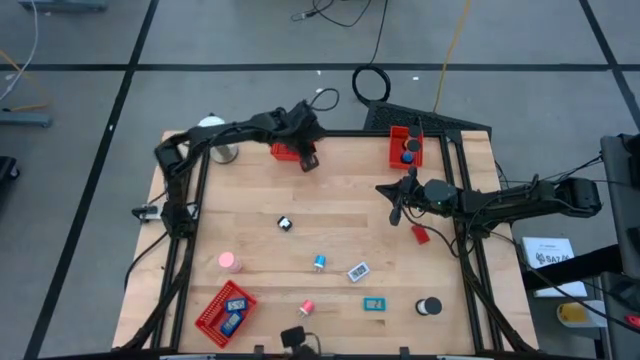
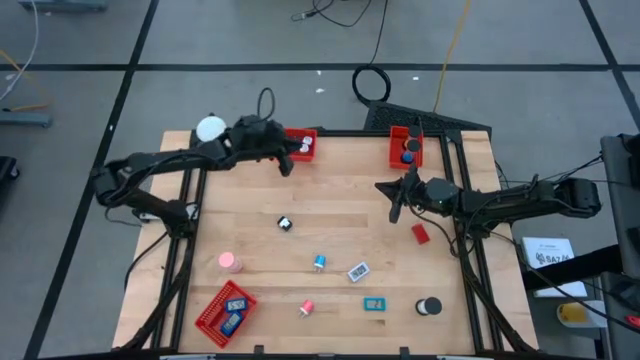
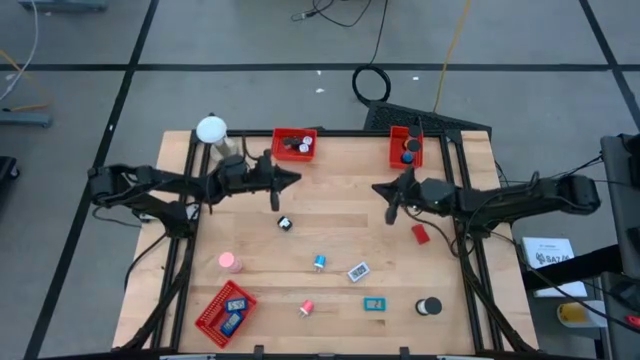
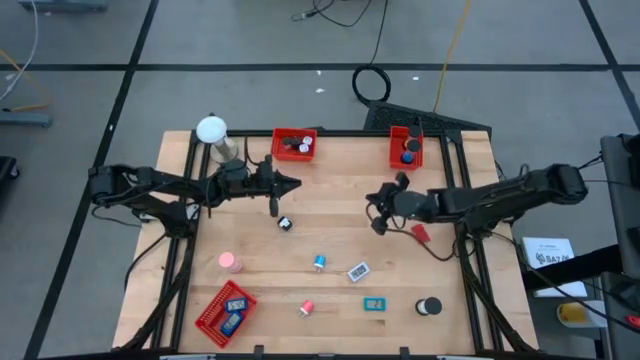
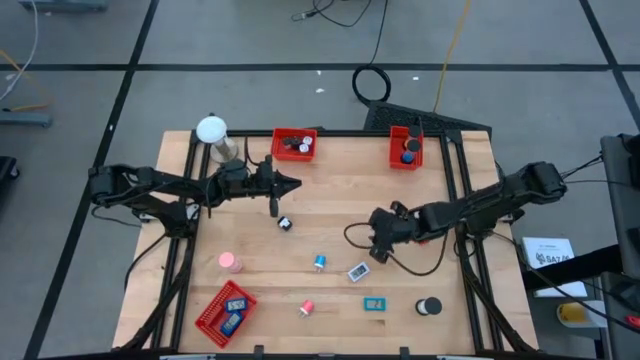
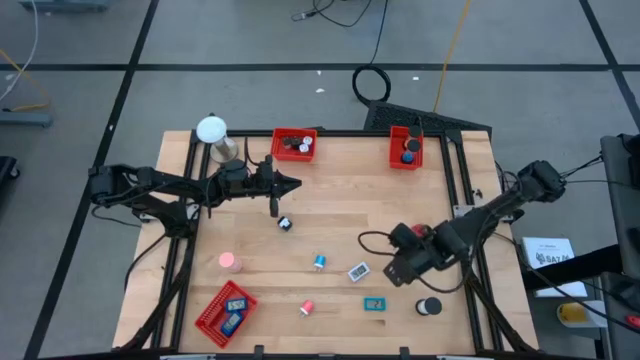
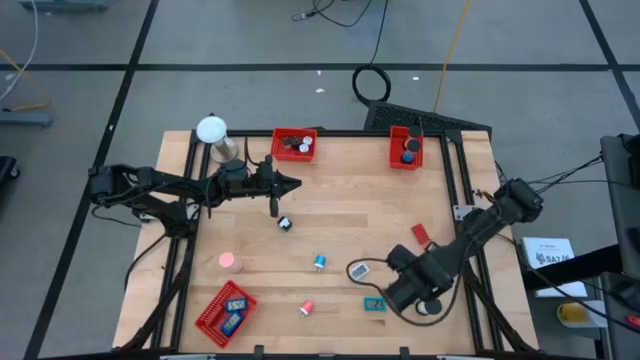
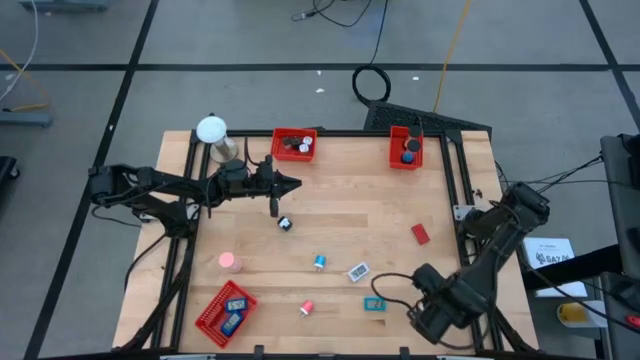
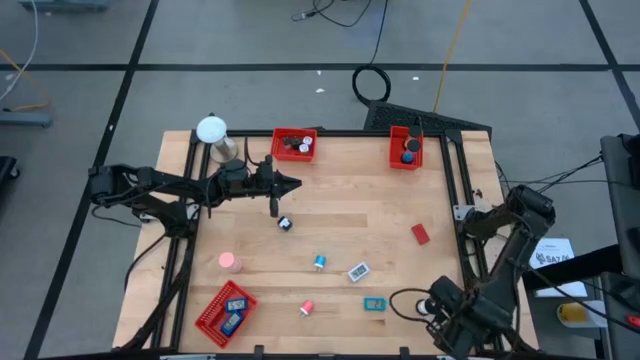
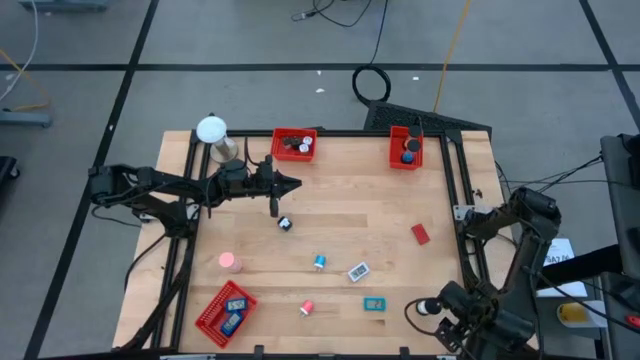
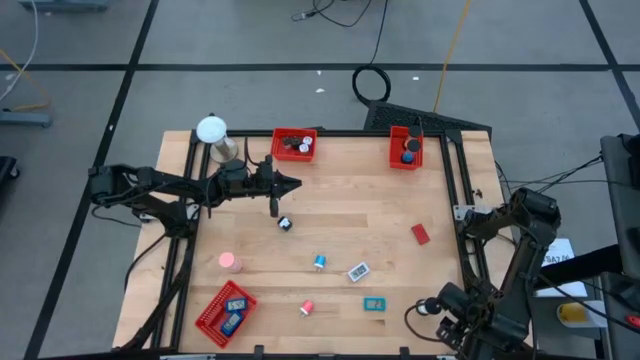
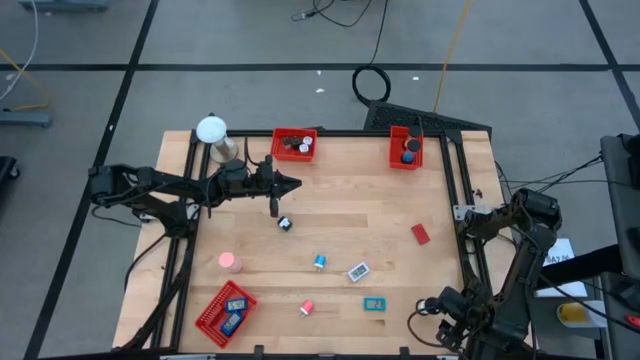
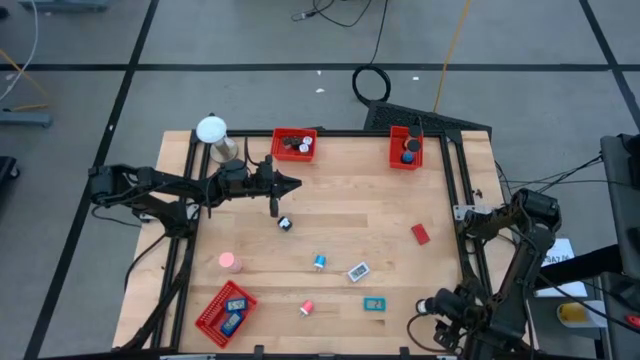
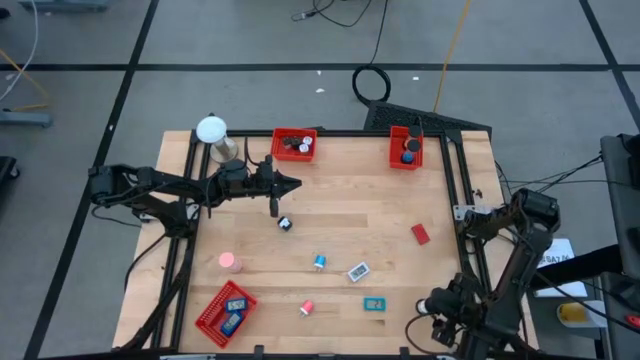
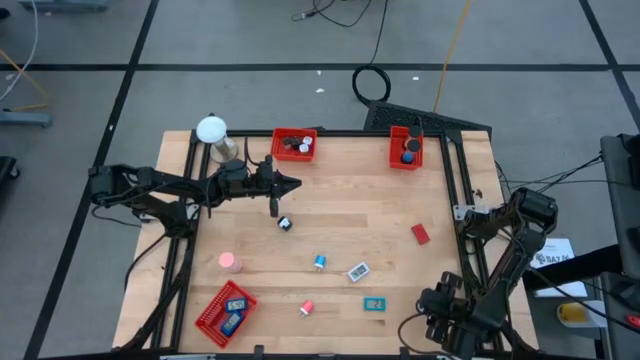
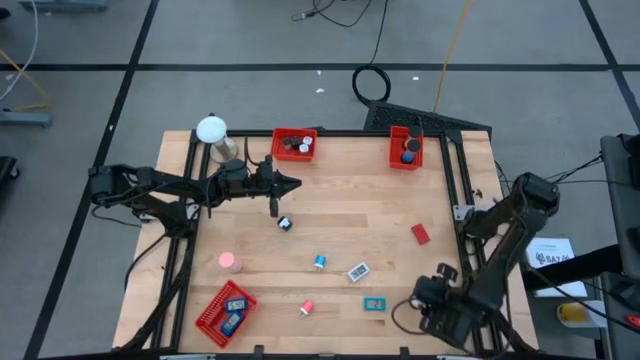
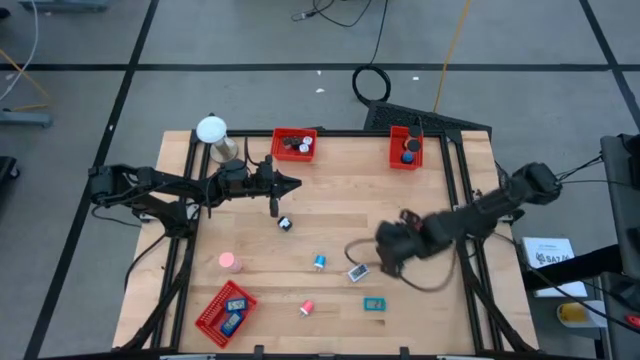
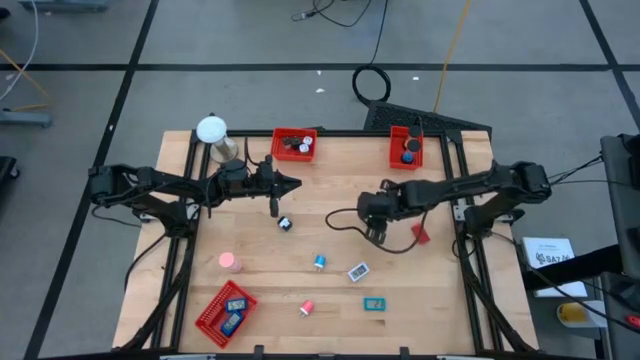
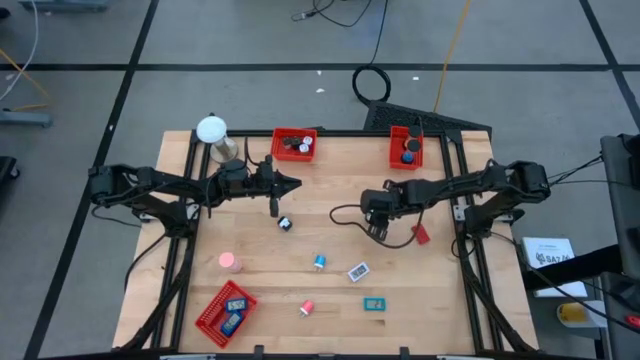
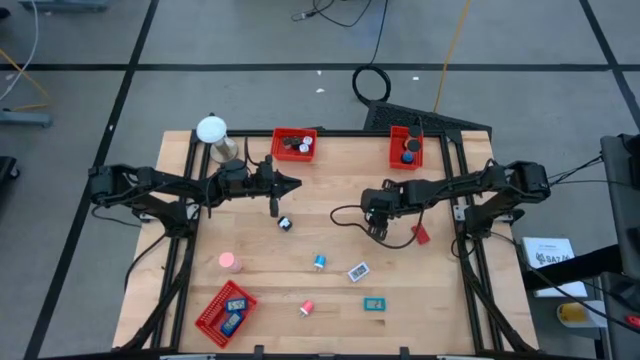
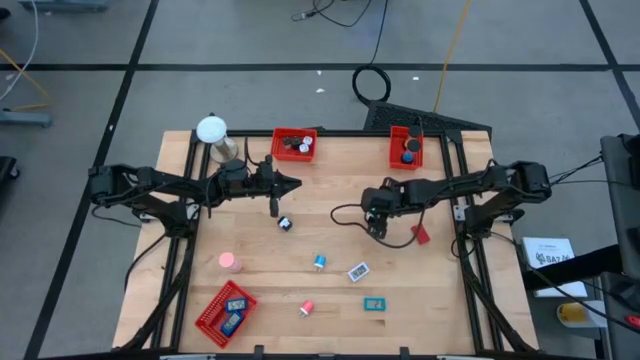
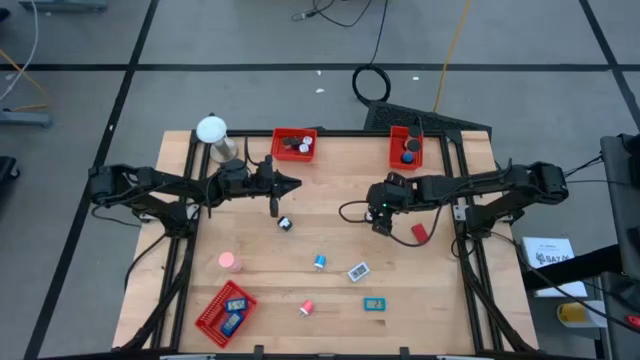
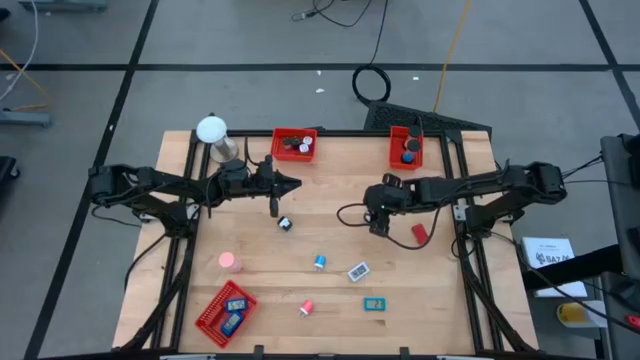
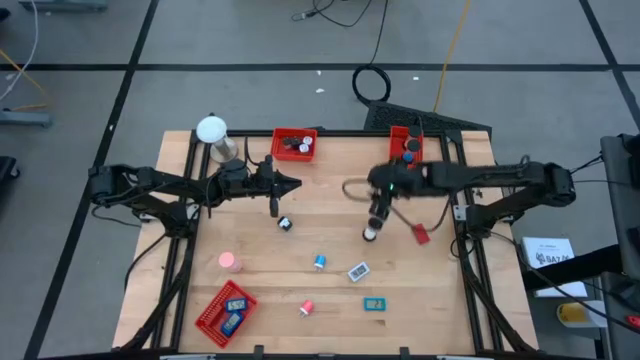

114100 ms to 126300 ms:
Task: Pick & Place Office items
Put the white hourglass into the top right red basket

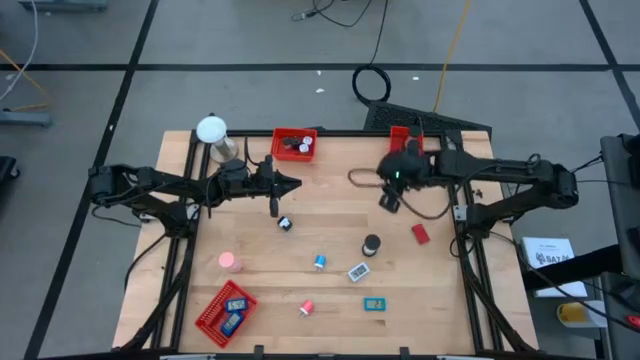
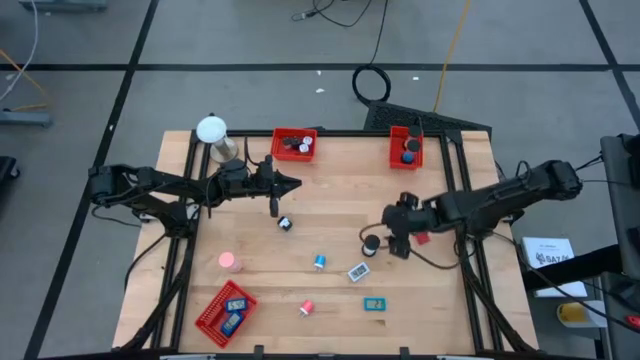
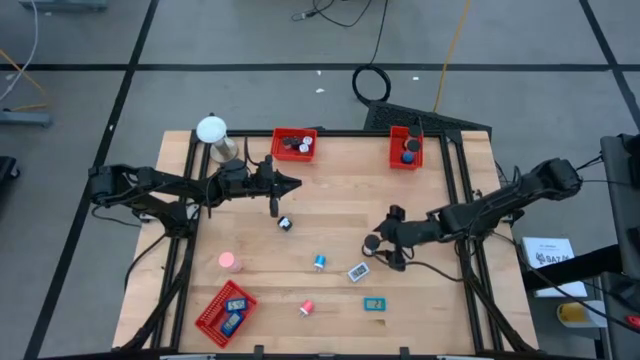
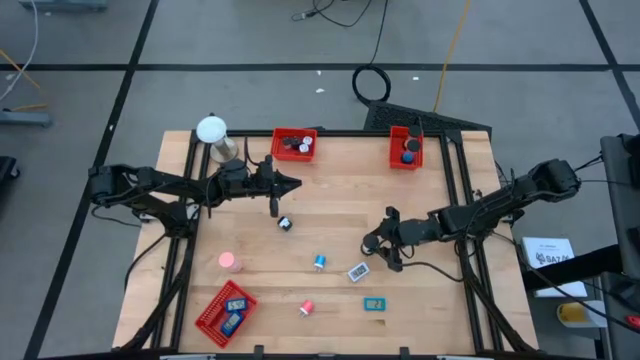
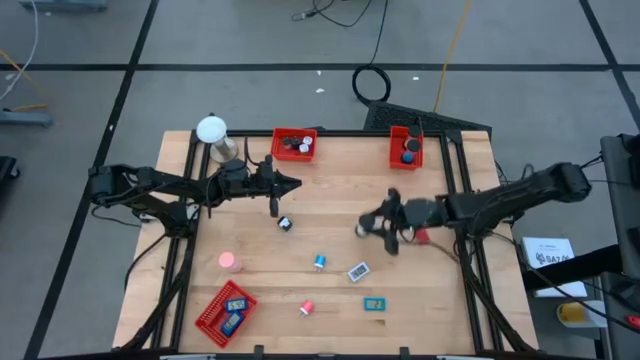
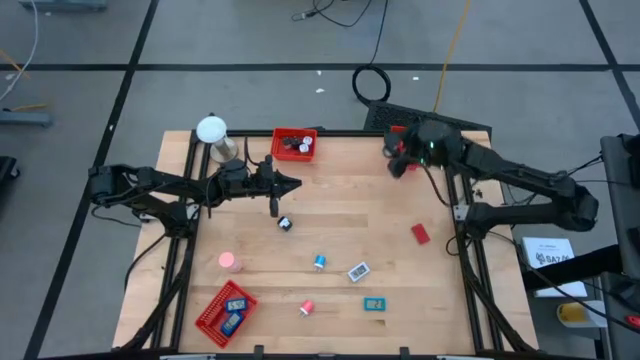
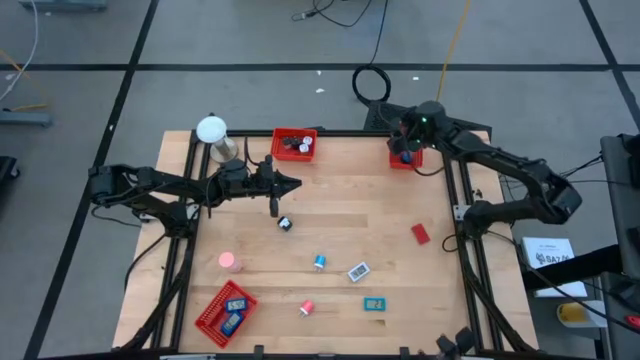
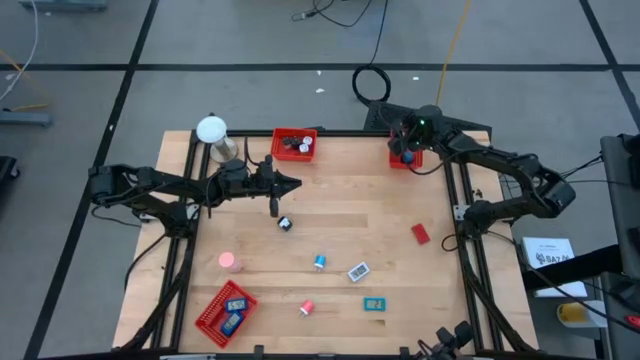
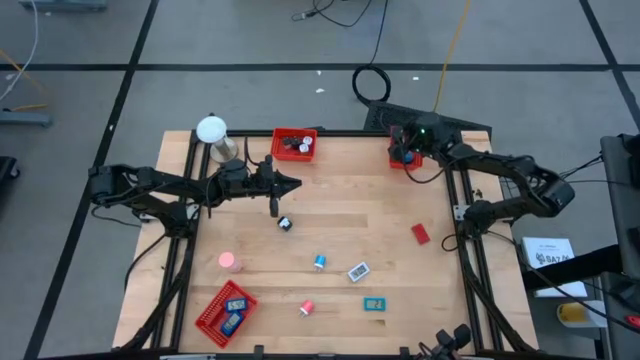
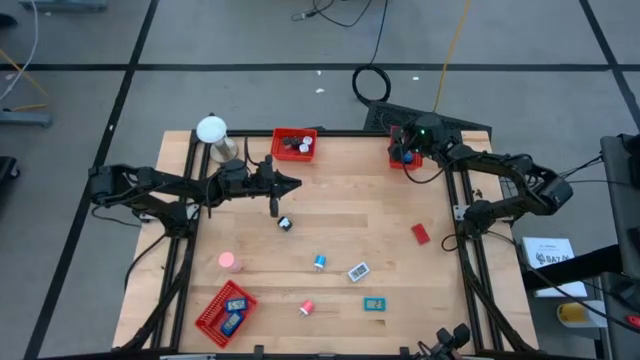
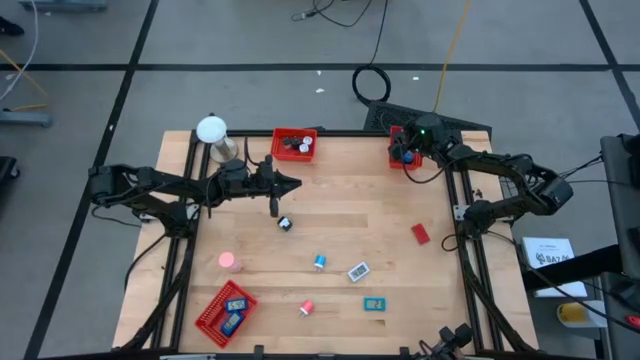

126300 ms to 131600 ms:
Put the white hourglass into the top right red basket

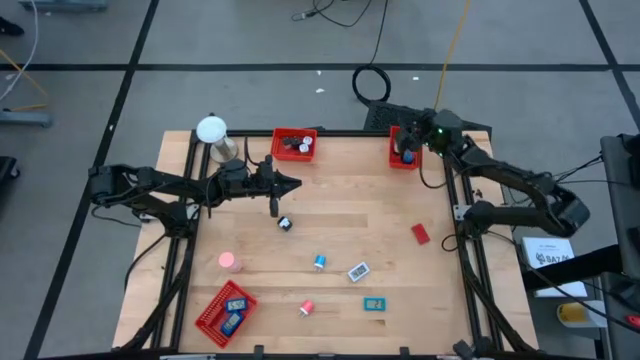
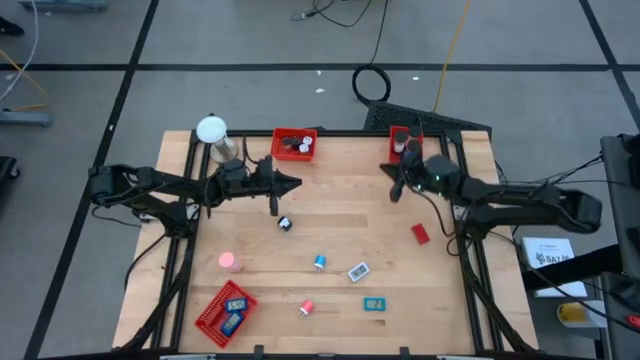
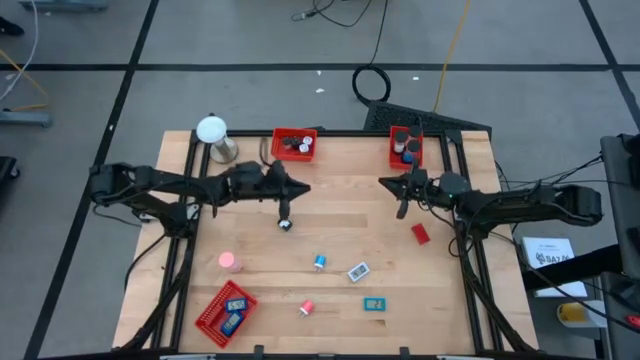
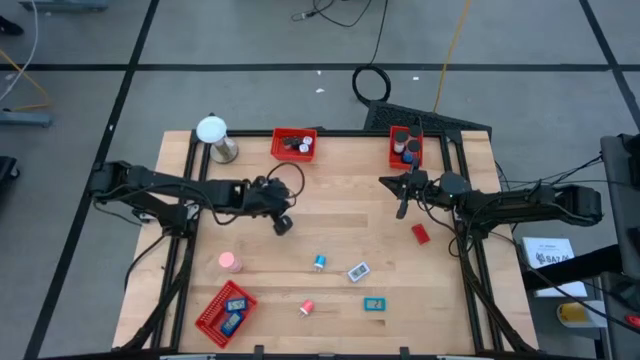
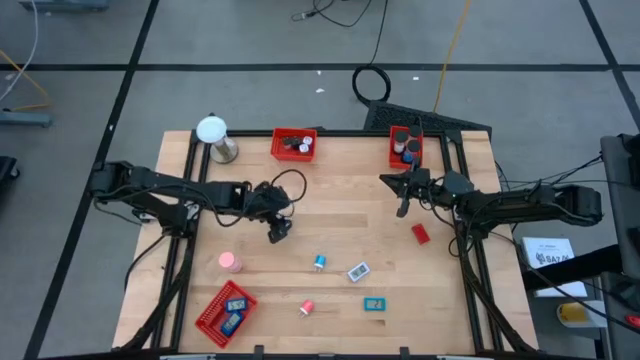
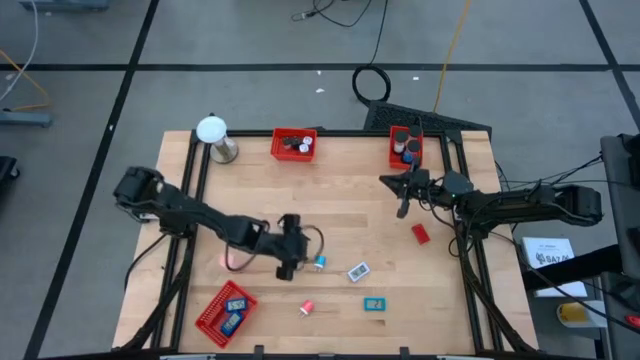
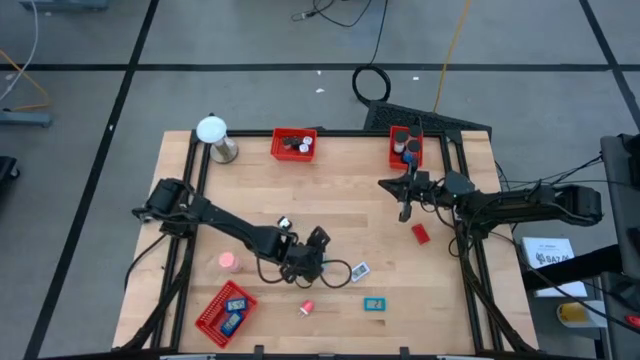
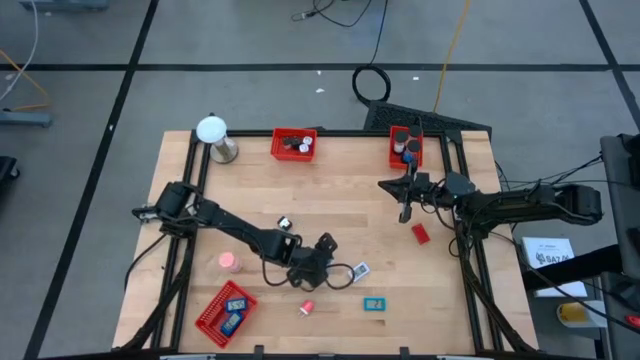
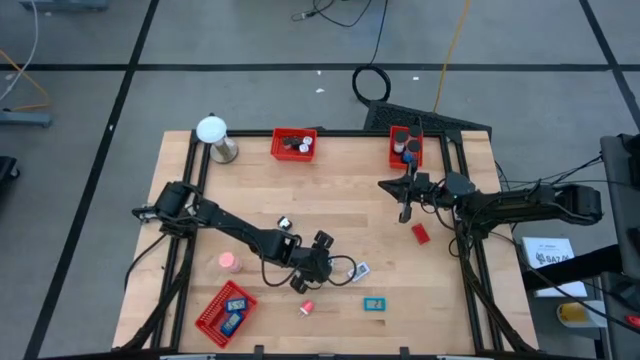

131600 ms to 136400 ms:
Put the blue charger adapter into the top left red basket

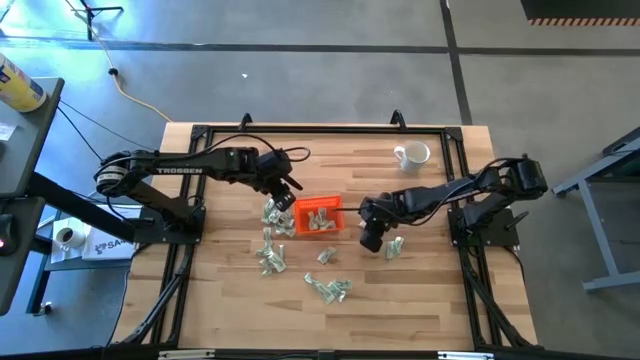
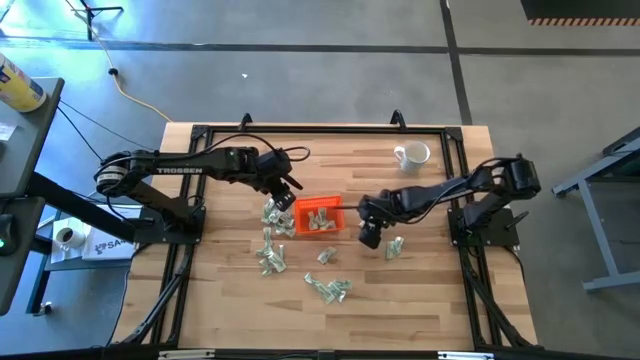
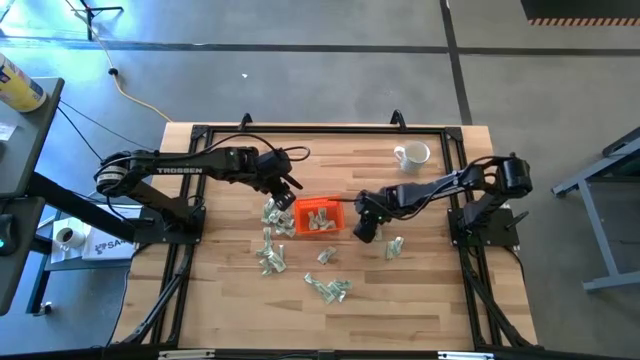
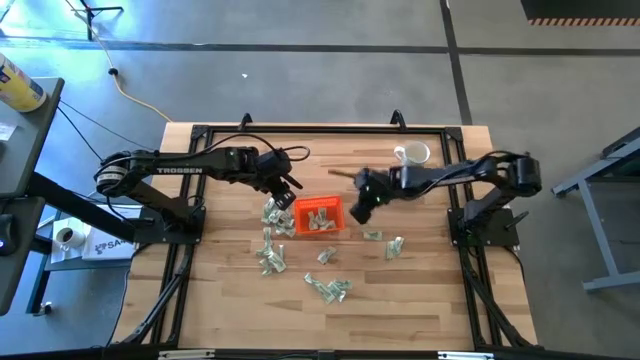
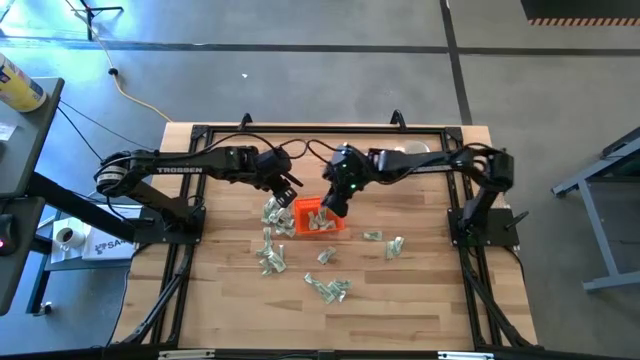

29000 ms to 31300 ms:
Task: Pick and place Stevia / Truvia into bins
Put the stevia packet into the orange bin
